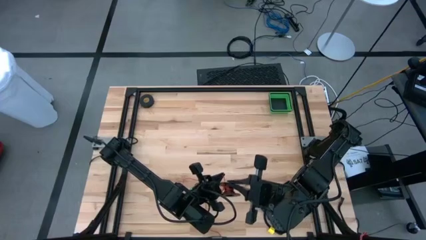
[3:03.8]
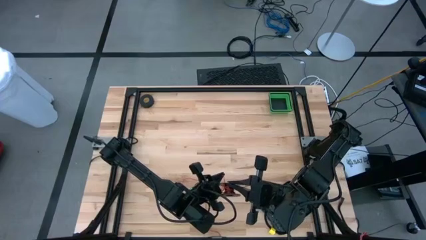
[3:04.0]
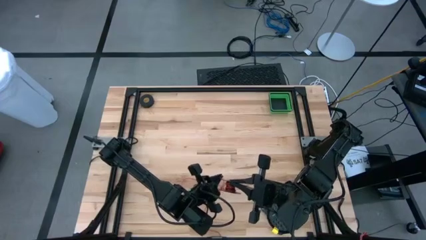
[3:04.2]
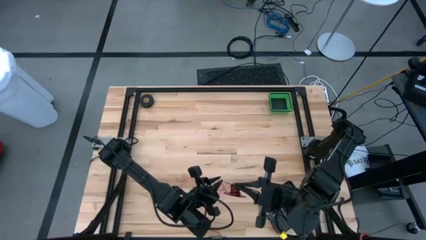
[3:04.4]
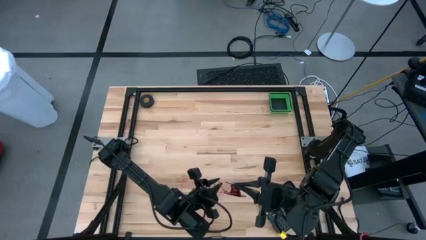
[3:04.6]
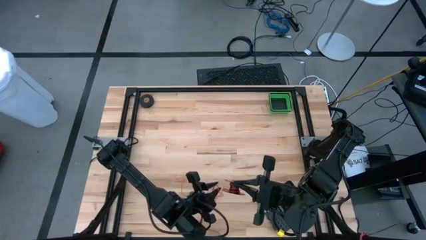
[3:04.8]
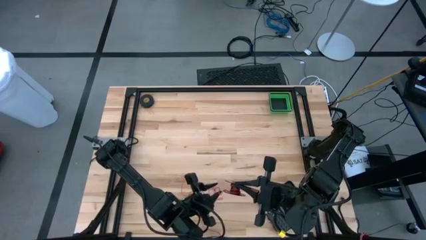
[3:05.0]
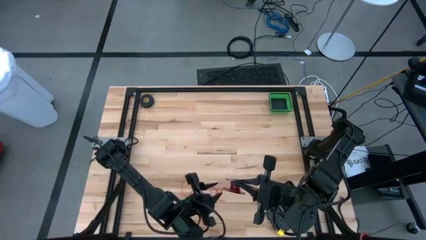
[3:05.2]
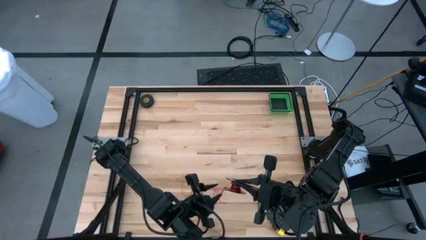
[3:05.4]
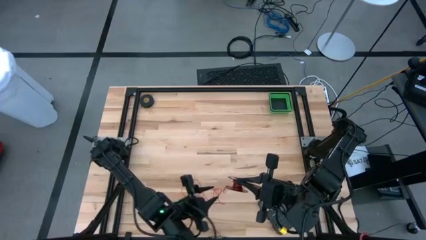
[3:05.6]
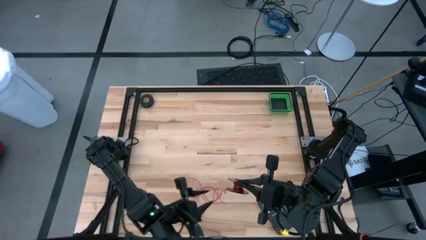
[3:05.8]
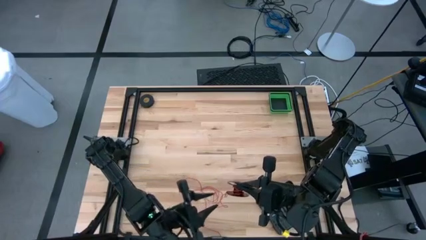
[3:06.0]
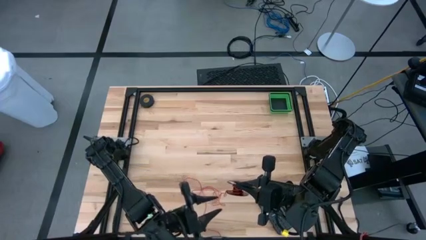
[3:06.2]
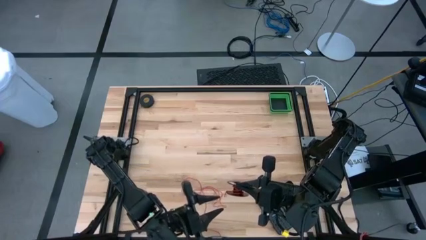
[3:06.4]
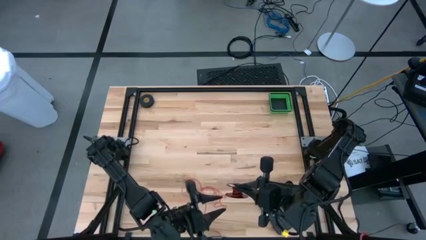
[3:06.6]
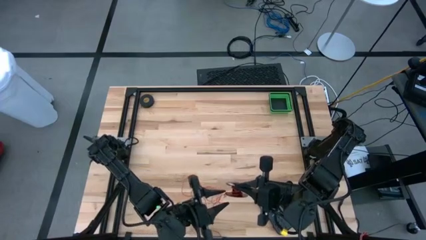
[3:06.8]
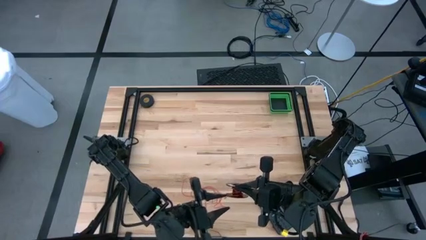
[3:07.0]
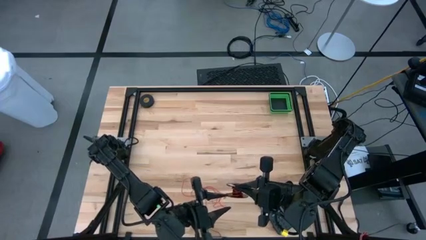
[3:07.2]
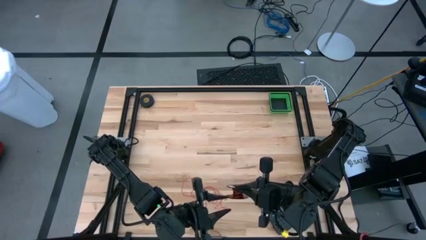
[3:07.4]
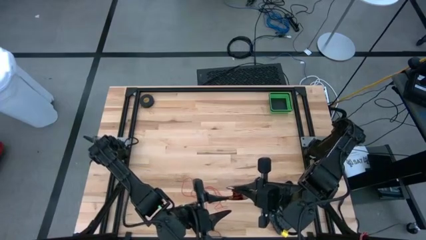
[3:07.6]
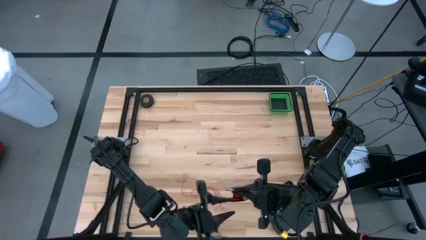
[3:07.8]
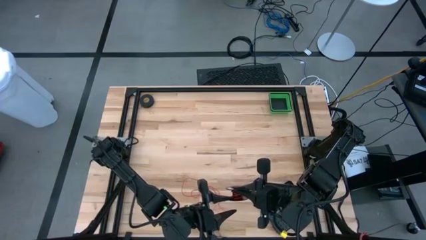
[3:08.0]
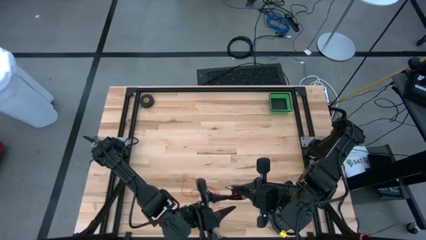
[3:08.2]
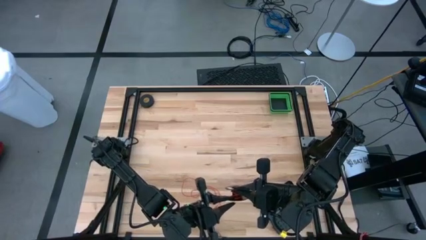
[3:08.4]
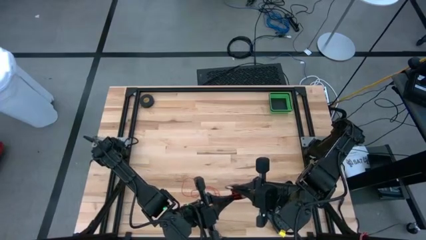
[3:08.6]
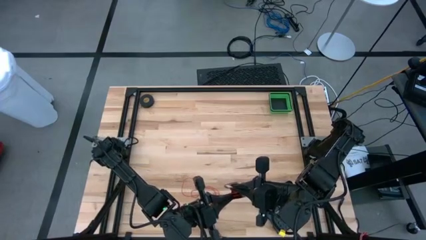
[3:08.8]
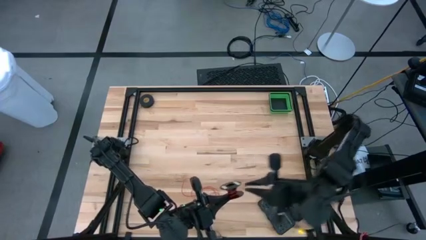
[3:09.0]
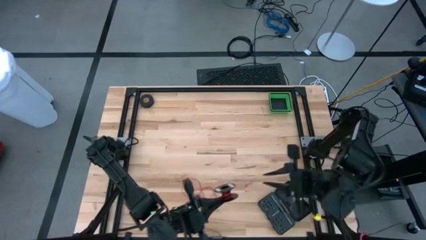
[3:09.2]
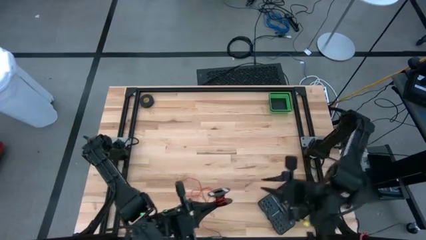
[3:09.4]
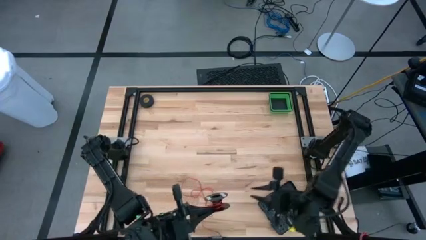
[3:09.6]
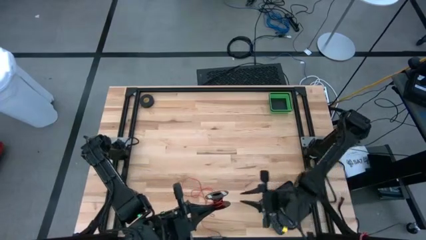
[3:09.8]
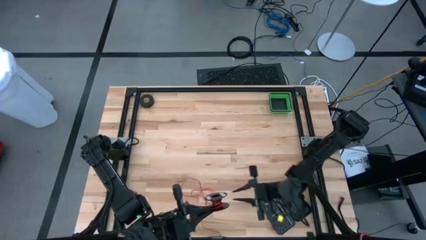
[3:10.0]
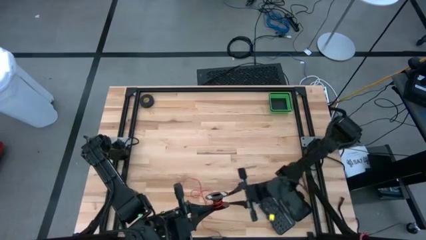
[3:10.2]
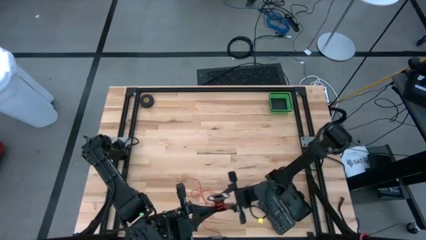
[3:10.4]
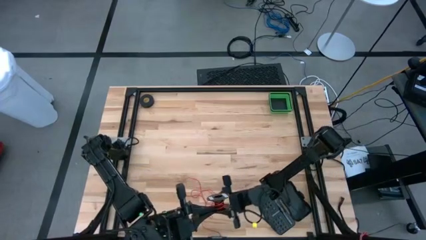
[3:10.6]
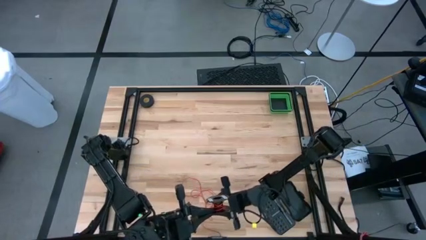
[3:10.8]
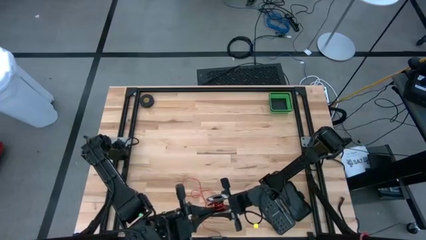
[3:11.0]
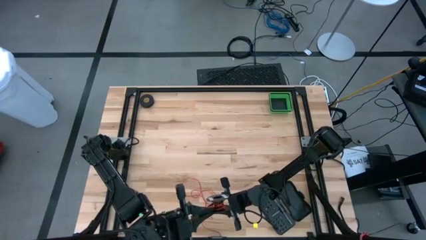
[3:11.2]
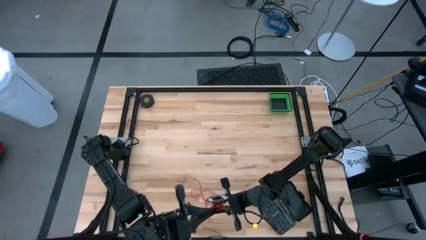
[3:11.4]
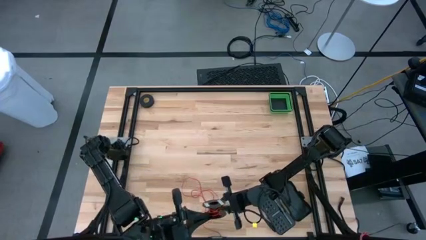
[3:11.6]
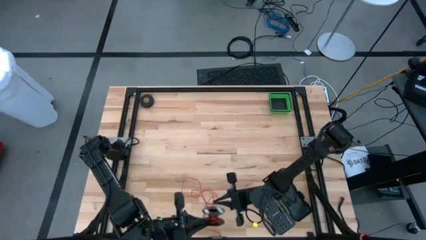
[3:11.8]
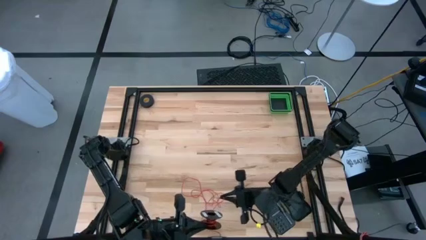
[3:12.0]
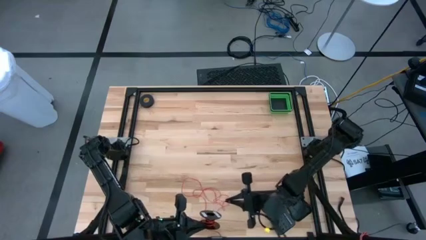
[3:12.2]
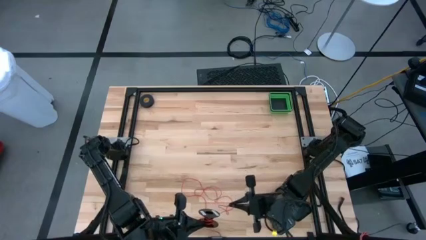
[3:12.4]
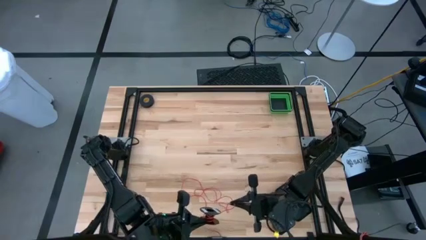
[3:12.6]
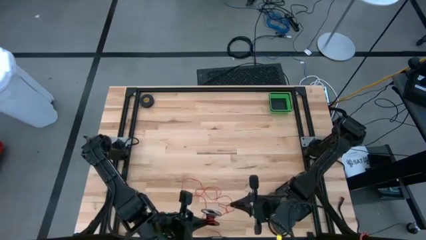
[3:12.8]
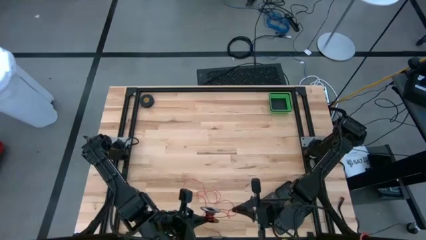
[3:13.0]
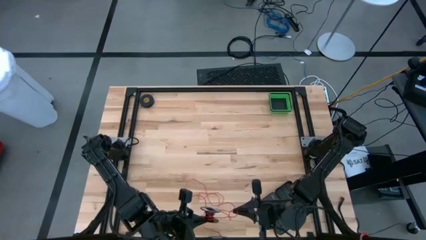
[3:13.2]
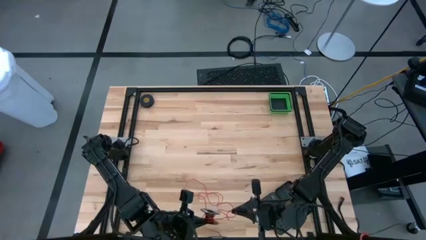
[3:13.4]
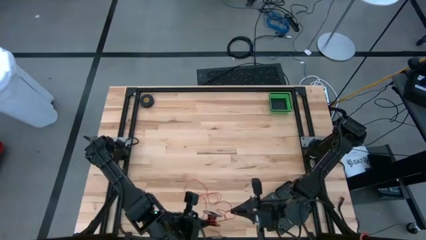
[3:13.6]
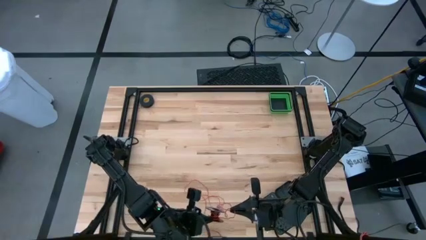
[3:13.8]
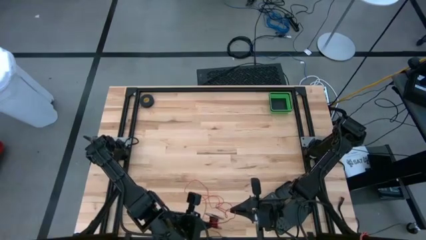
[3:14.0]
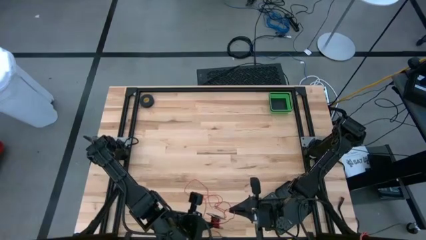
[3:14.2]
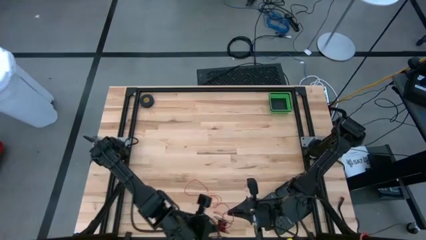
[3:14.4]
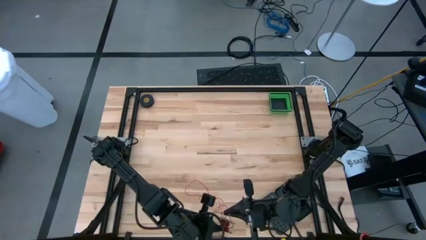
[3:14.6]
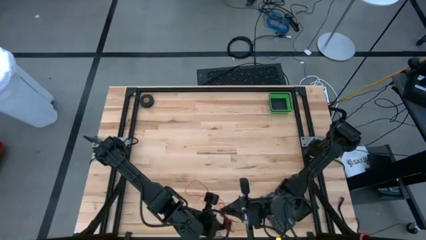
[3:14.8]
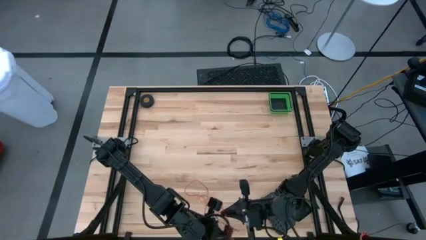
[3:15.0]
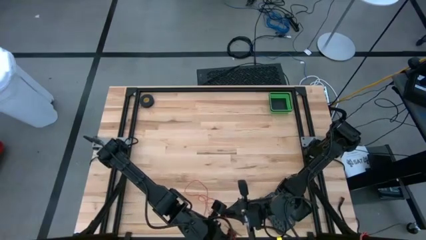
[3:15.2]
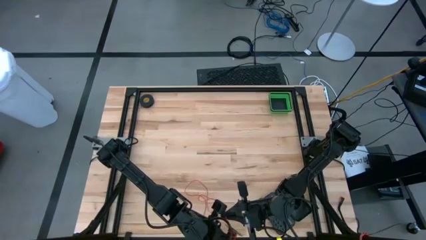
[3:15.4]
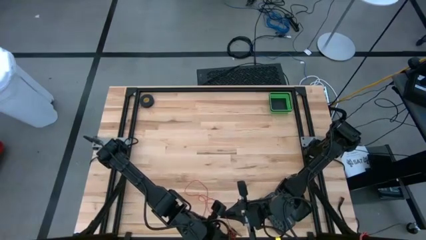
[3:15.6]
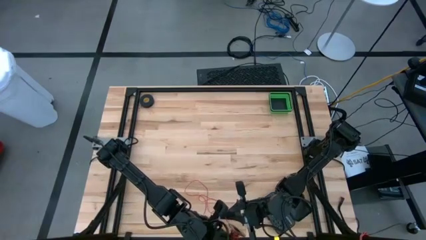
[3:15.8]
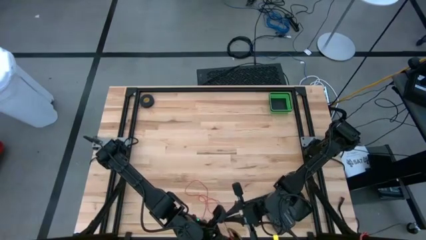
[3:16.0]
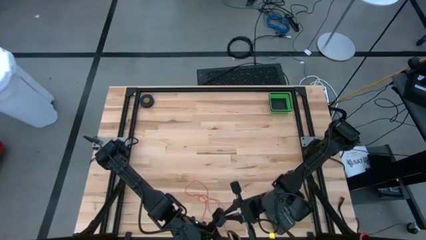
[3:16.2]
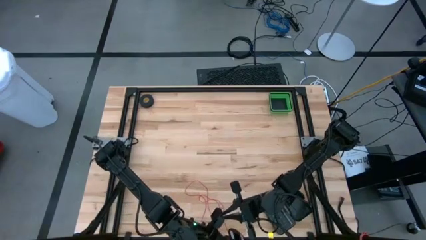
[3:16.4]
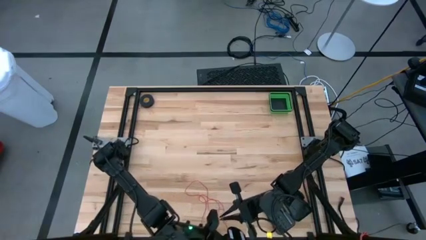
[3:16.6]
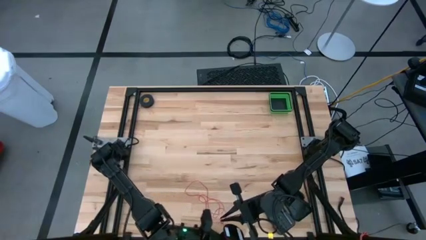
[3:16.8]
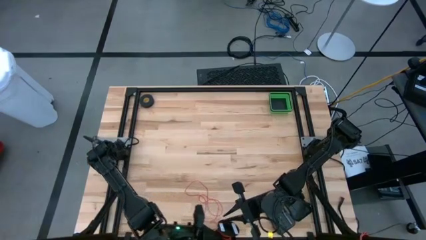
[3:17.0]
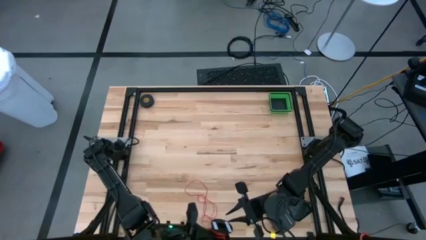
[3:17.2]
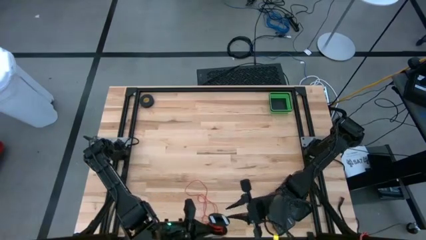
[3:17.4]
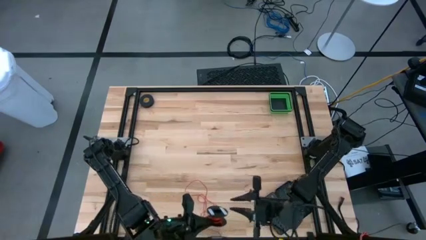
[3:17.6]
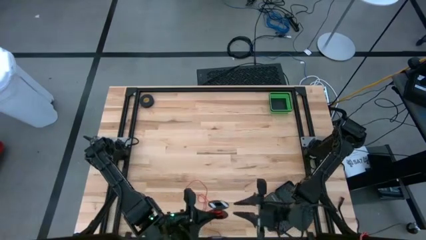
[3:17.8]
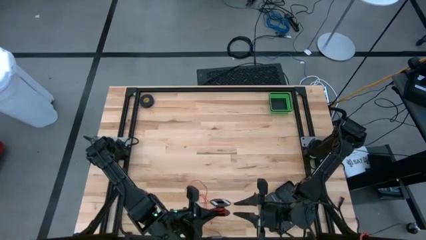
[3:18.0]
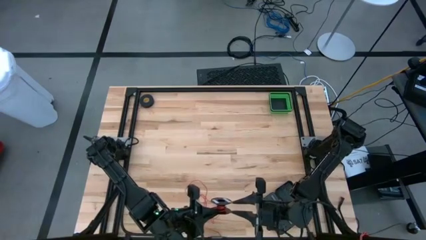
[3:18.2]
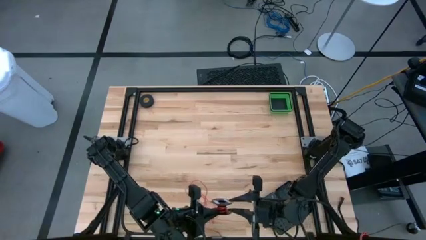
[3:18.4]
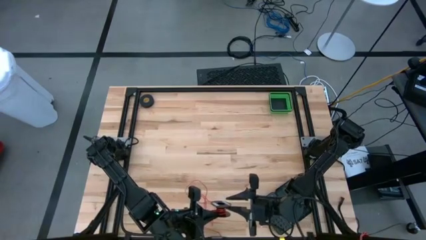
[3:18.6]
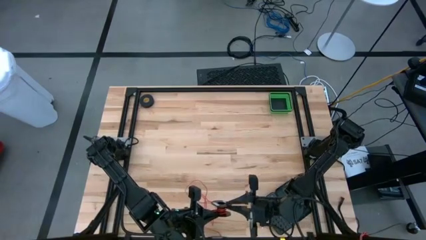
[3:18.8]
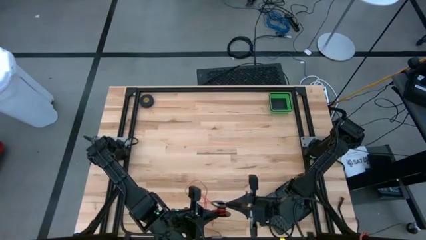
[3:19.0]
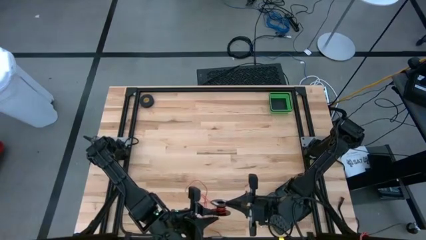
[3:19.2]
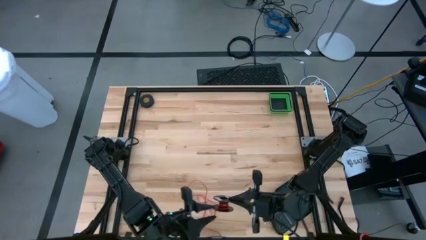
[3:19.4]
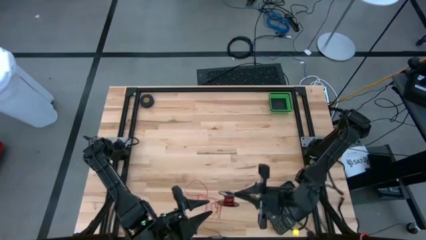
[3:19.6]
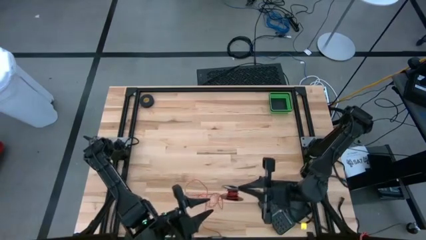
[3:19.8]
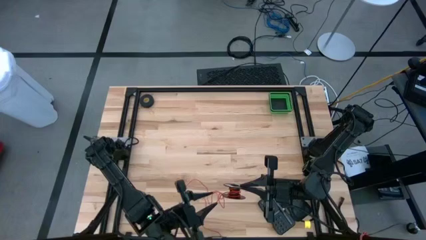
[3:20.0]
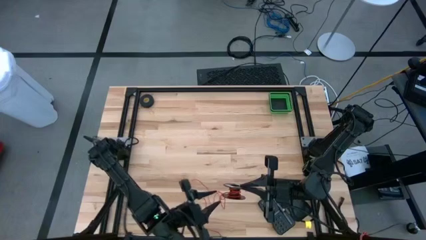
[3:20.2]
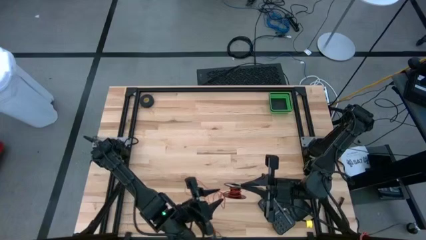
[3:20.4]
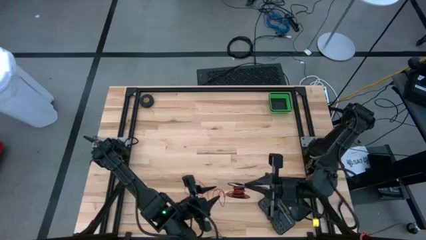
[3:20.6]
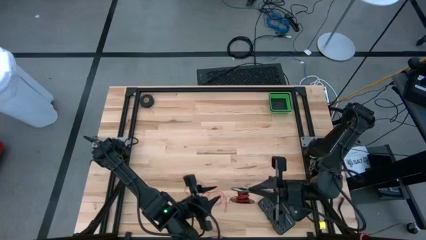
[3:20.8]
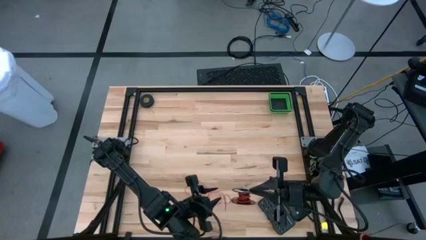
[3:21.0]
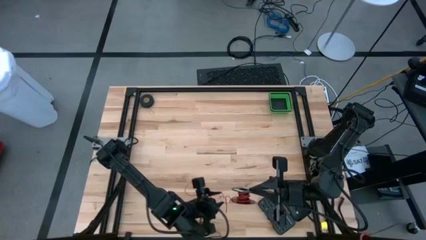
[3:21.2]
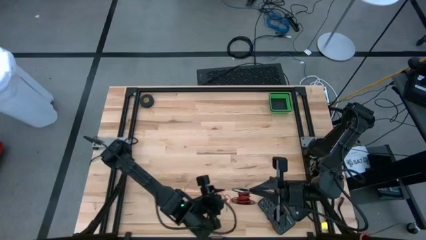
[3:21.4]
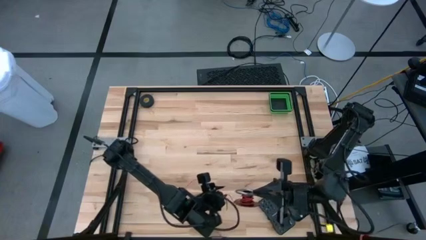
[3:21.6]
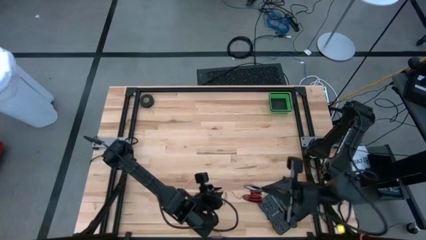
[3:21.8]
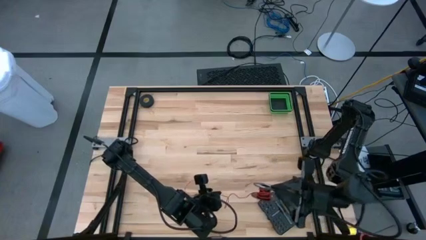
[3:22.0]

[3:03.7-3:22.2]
Task: Coil cords
Coil the red wire on the black spool
